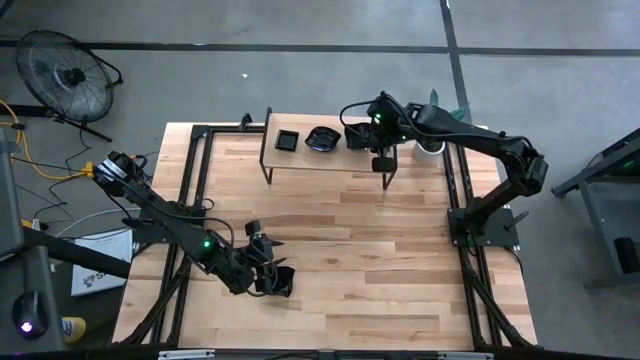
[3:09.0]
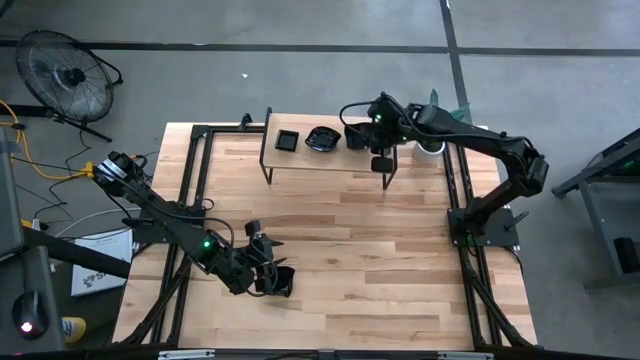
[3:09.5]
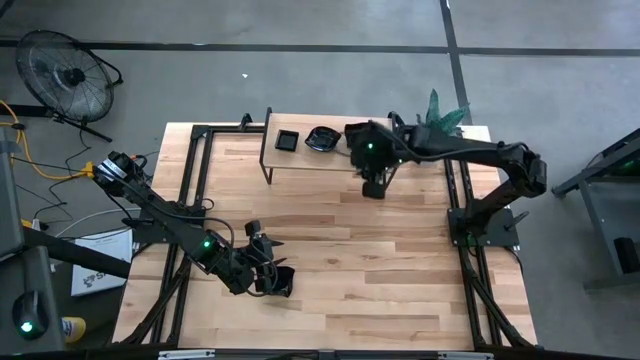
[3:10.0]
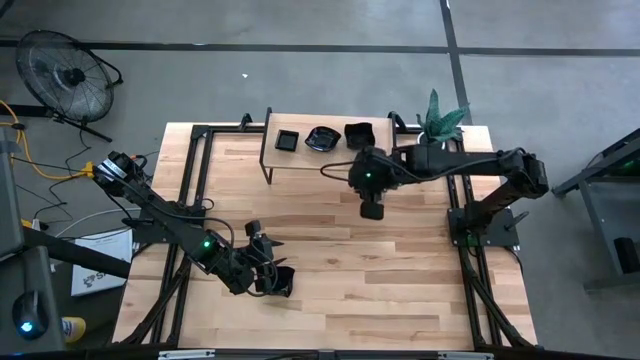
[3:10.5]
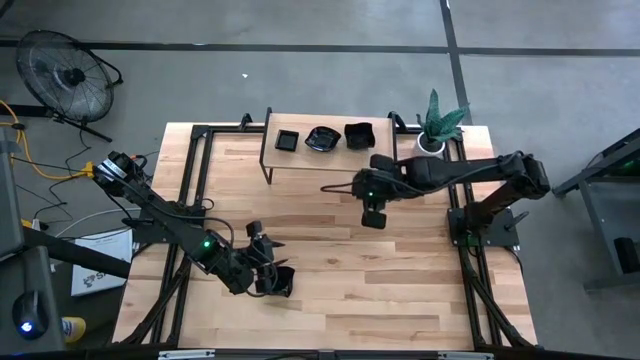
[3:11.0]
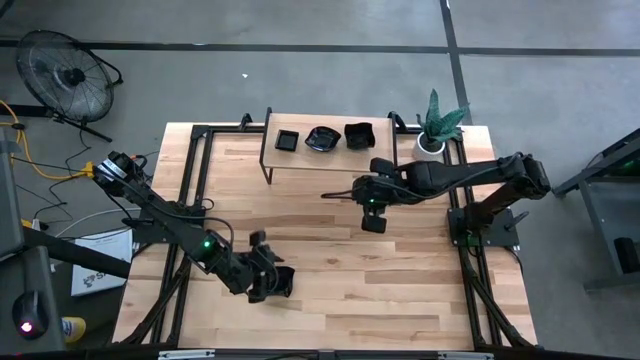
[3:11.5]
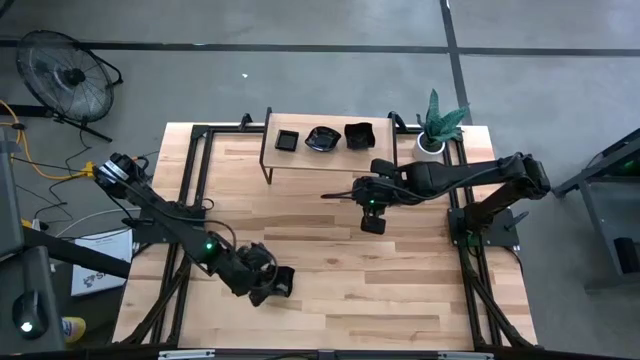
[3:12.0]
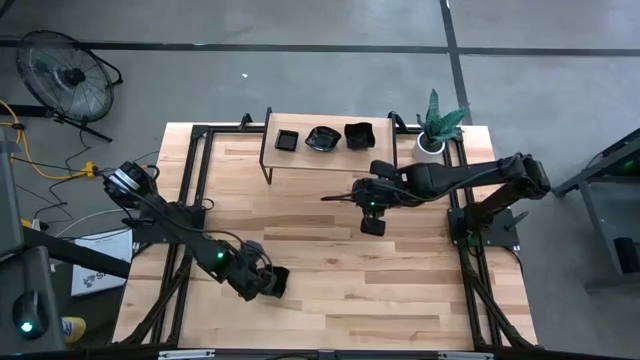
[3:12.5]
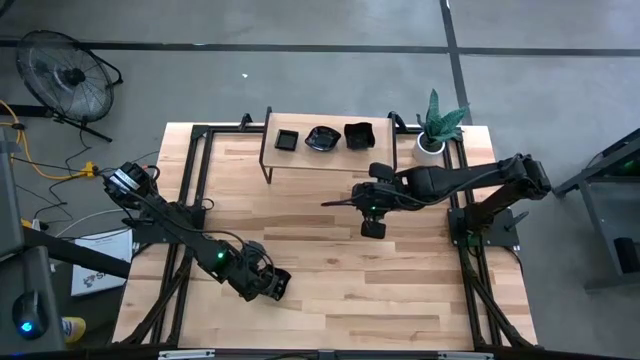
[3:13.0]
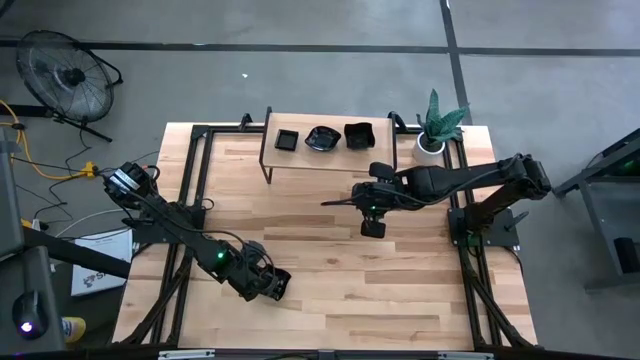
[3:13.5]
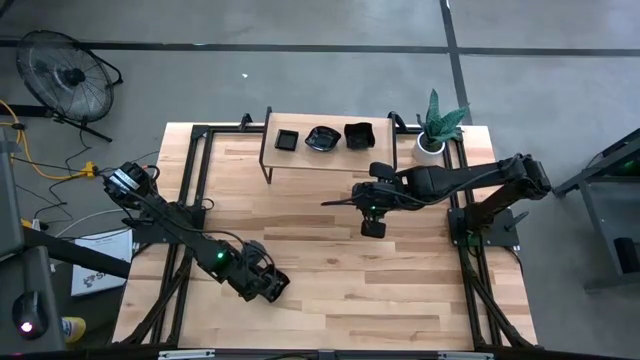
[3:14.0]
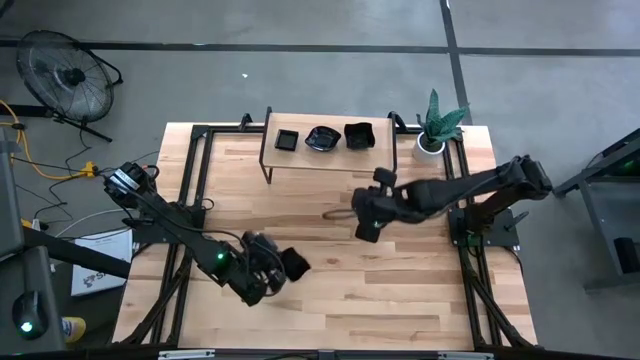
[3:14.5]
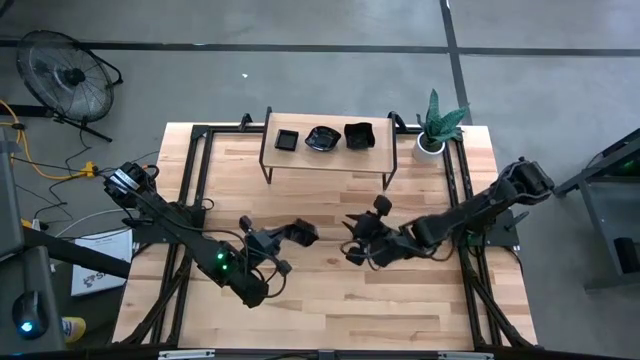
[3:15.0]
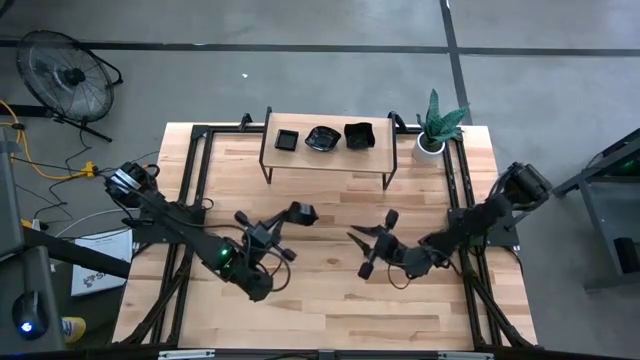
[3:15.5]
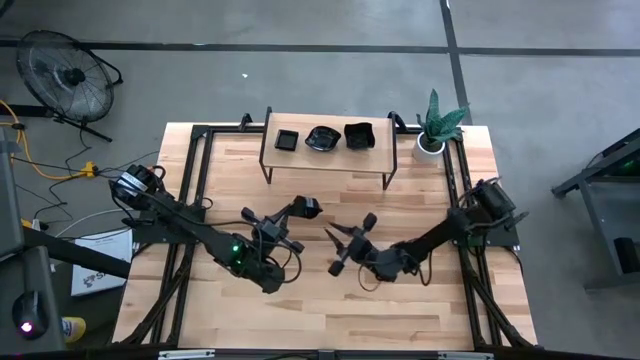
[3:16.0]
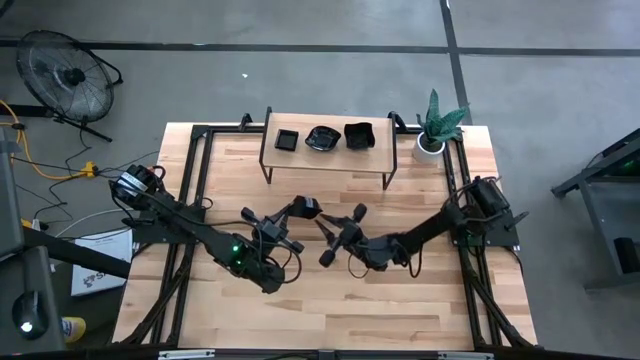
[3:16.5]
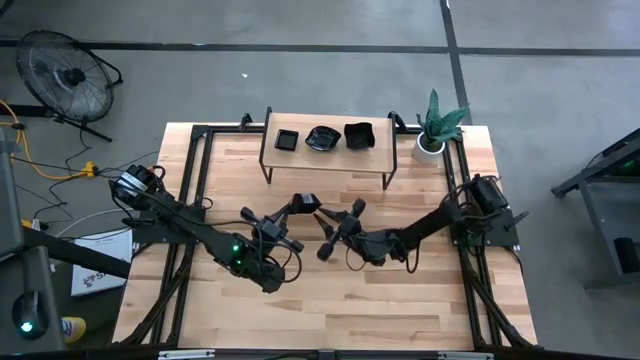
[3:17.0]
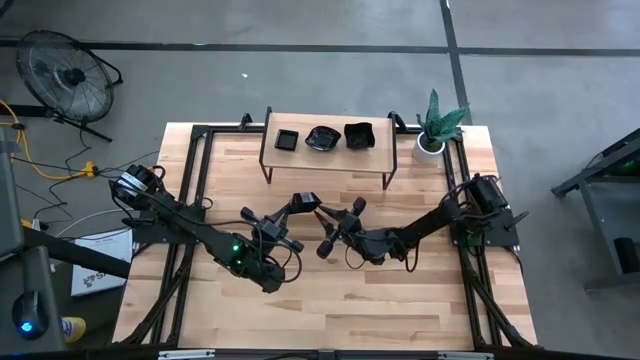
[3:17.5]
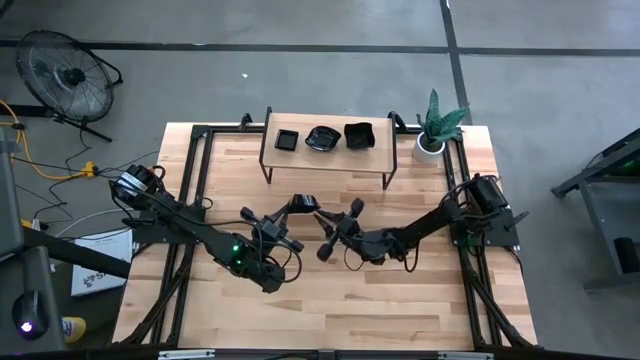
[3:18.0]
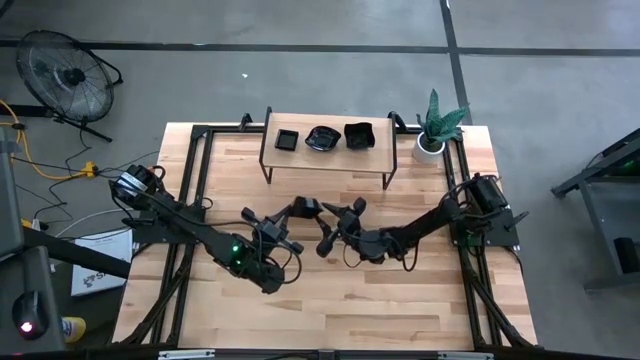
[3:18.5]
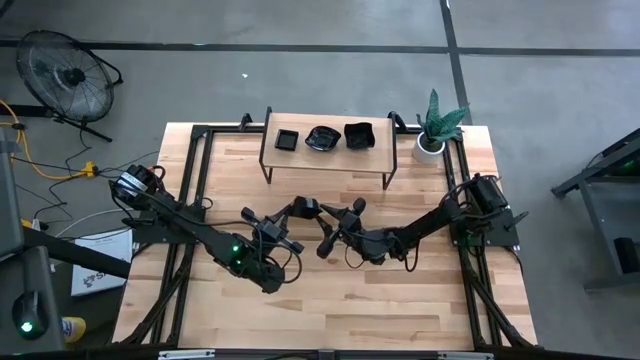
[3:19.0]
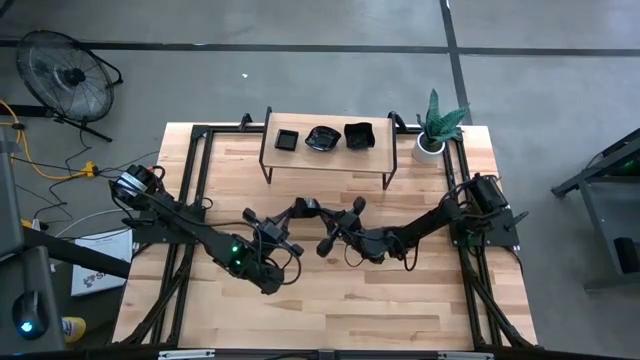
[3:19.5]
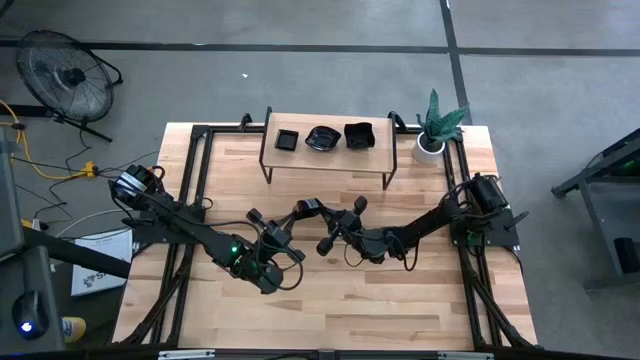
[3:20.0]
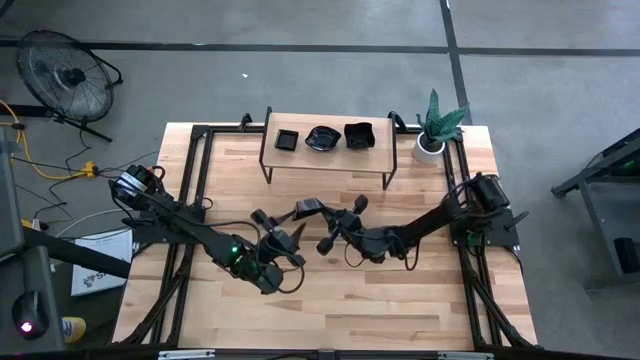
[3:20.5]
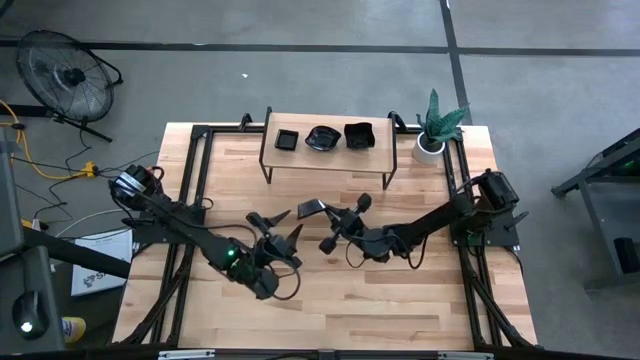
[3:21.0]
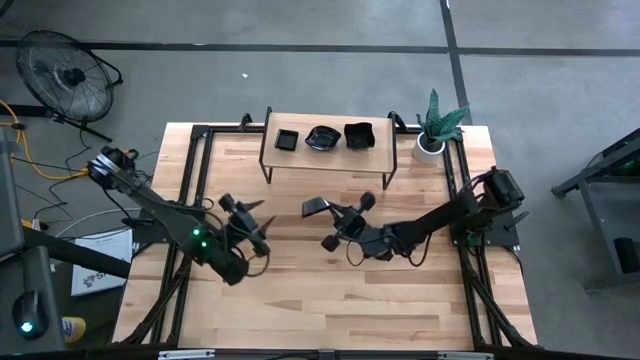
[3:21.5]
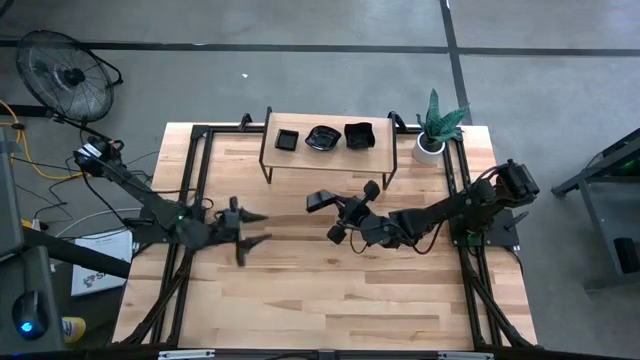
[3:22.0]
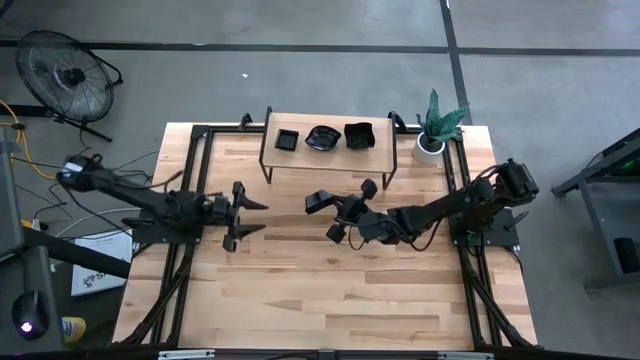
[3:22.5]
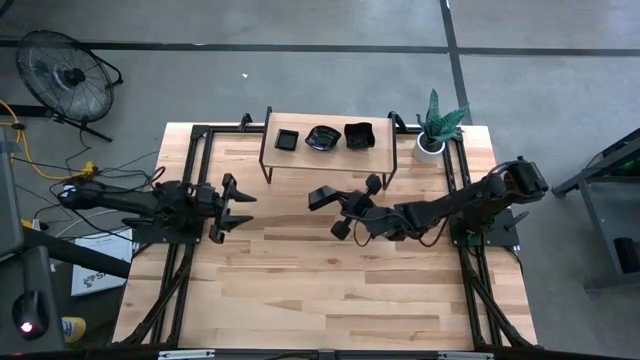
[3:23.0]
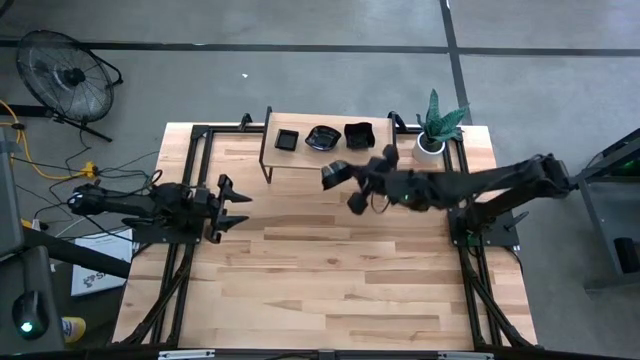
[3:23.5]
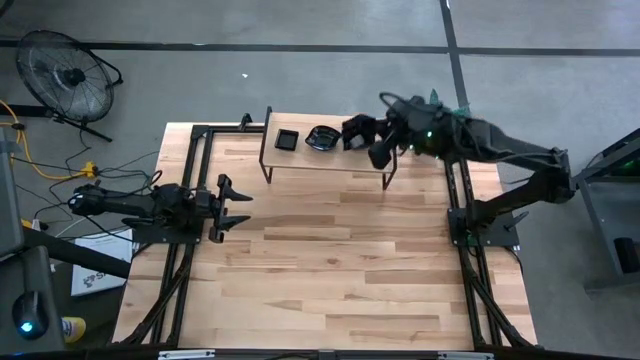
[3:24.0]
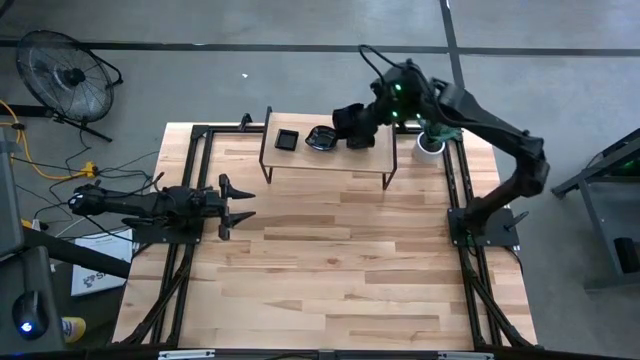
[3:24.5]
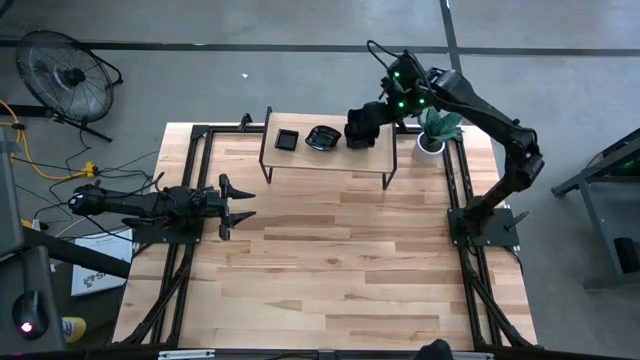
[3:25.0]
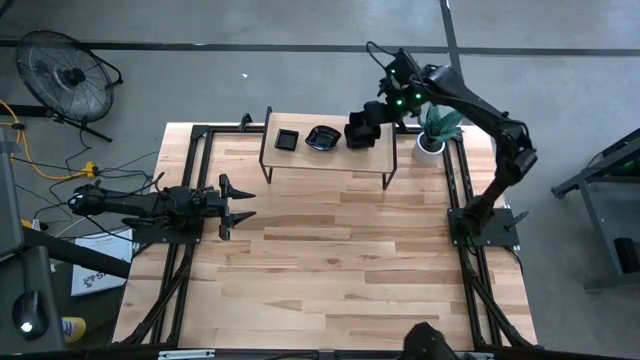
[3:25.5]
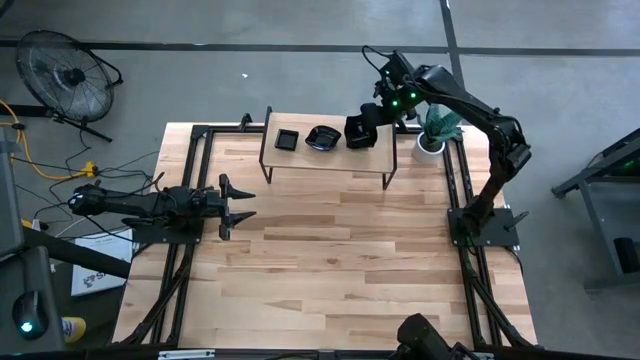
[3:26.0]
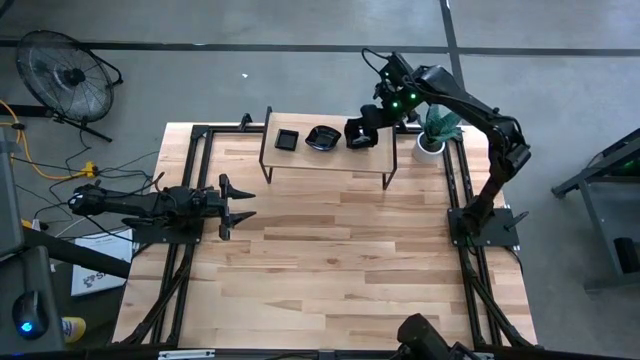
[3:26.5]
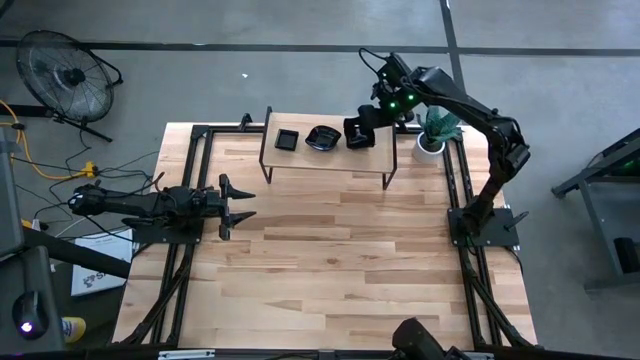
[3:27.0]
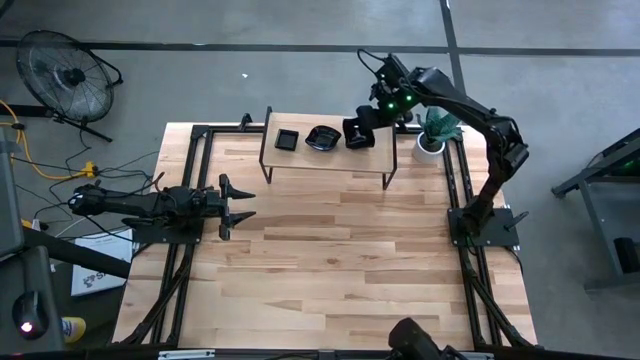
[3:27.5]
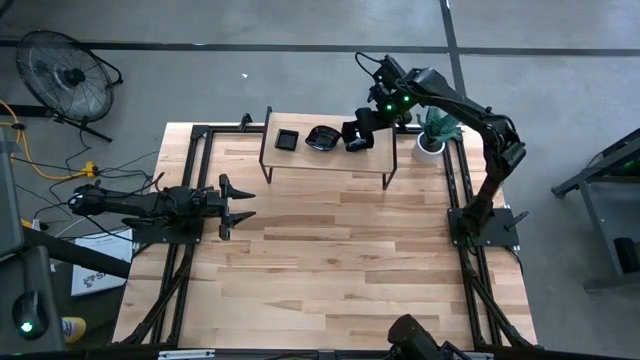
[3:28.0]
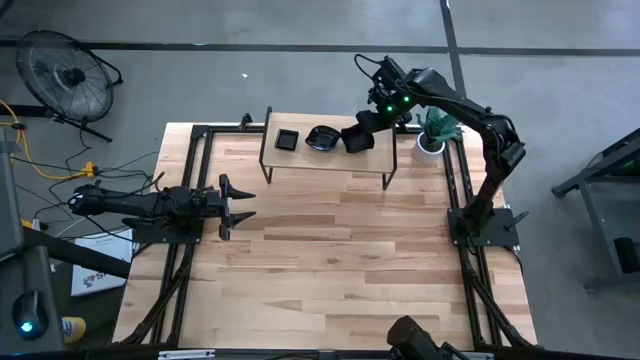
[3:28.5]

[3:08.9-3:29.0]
Task: Pick & Place Mini shaped plates
Stack the black distorted square plate on top of the stacked black distorted square plates on the shelf

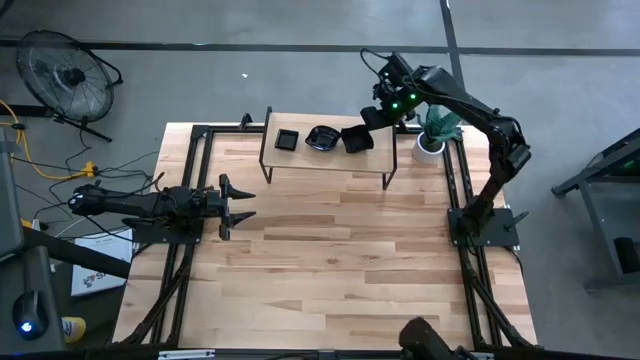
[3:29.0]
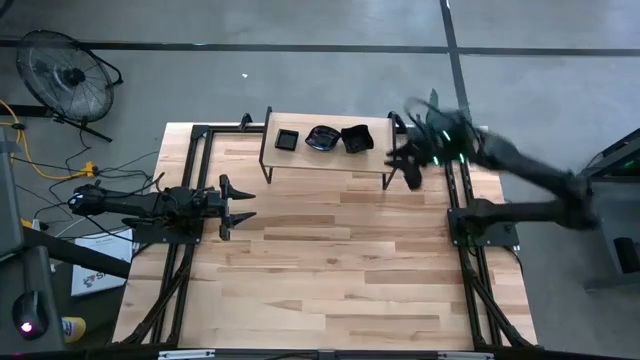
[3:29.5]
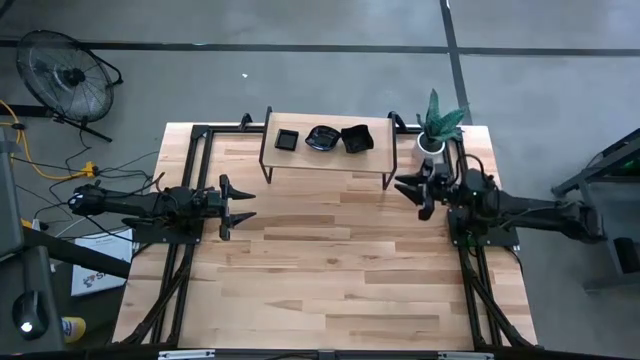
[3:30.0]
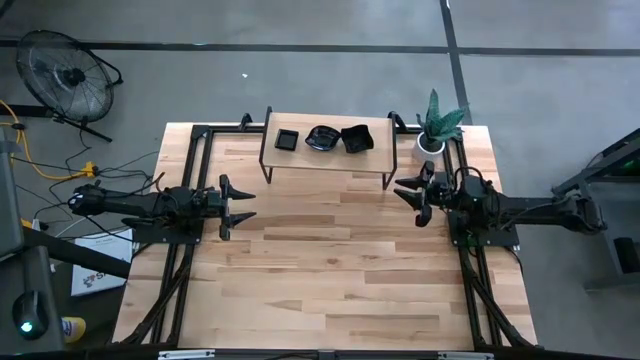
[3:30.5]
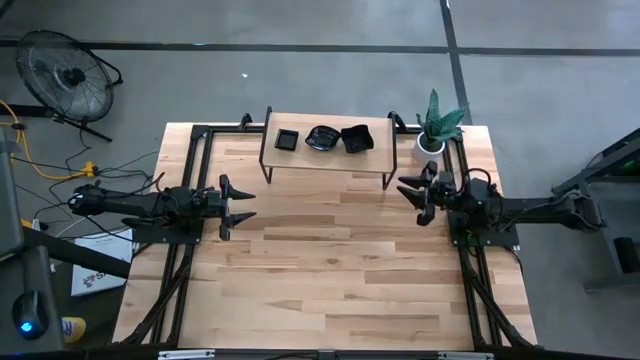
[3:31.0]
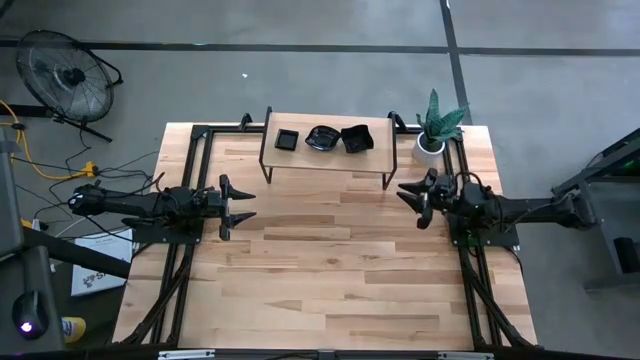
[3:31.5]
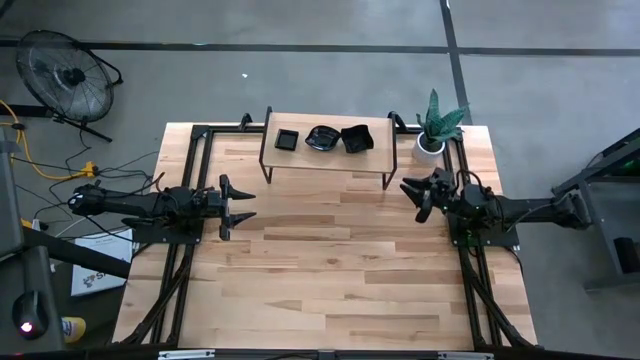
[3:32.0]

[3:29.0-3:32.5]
Return to Home Position
